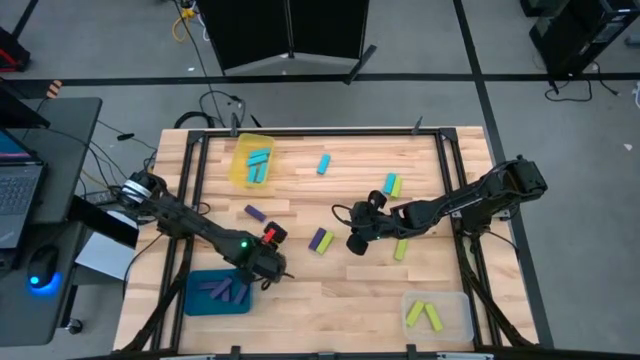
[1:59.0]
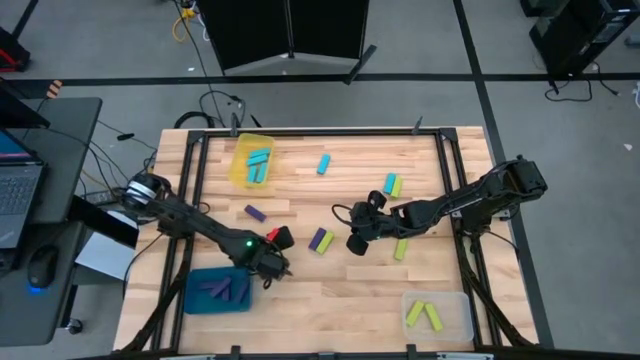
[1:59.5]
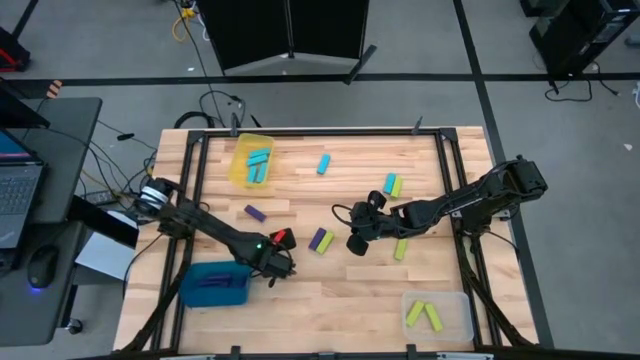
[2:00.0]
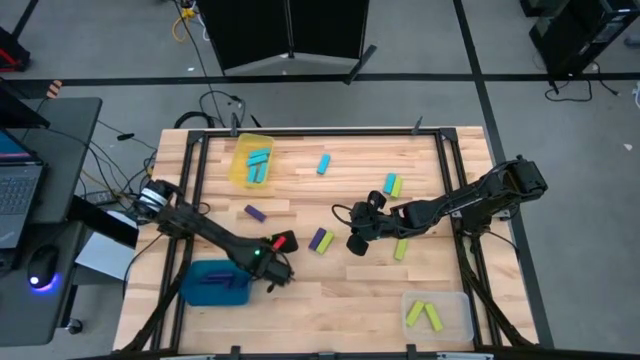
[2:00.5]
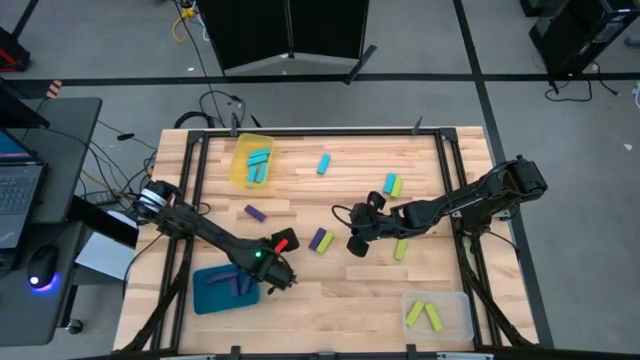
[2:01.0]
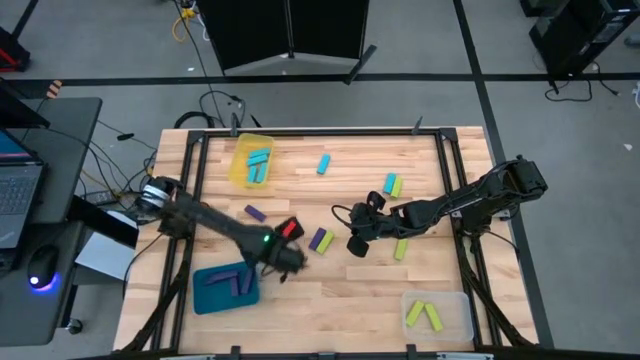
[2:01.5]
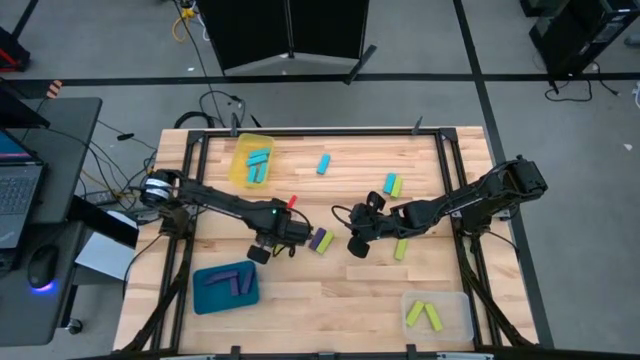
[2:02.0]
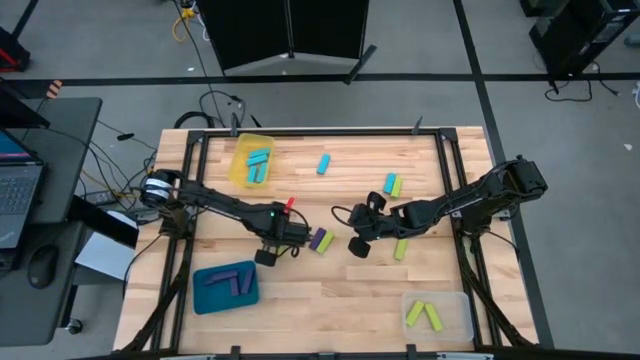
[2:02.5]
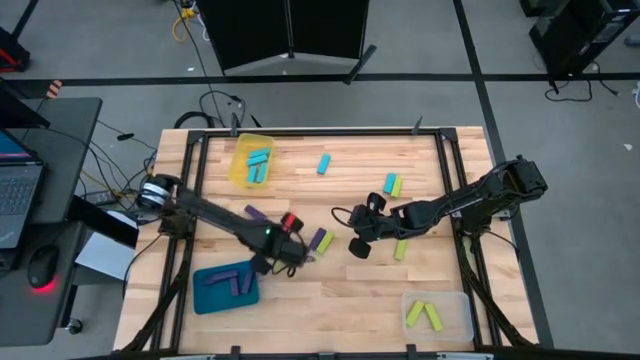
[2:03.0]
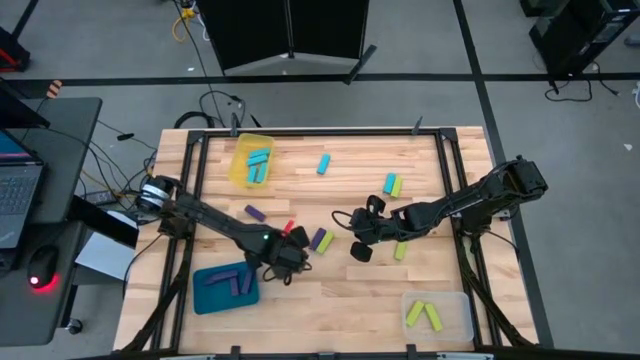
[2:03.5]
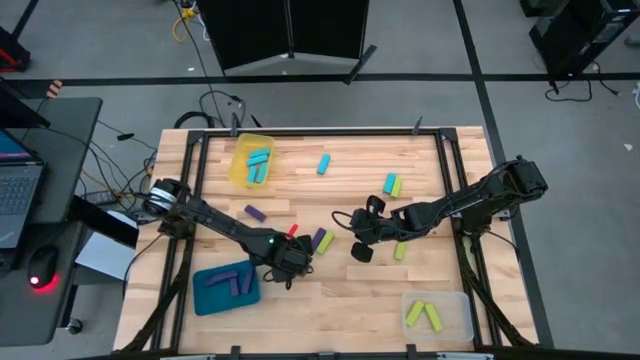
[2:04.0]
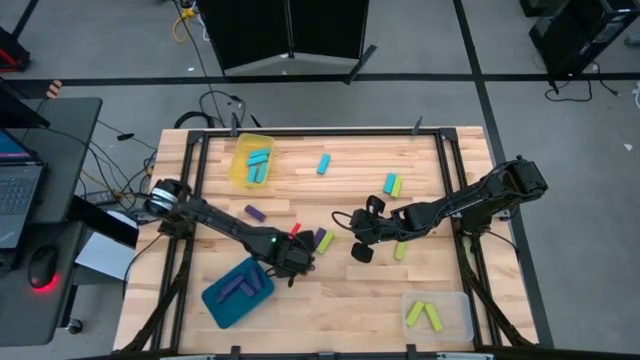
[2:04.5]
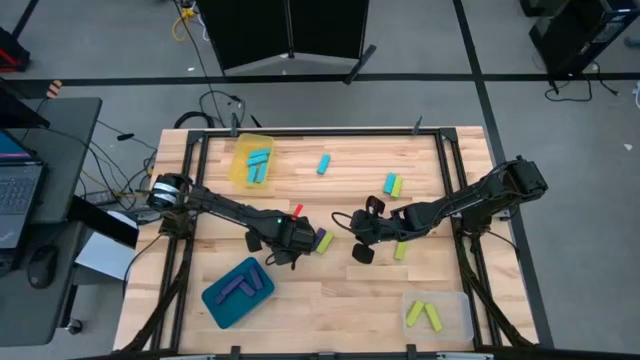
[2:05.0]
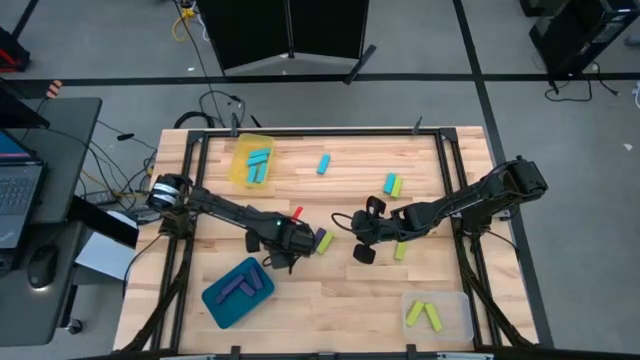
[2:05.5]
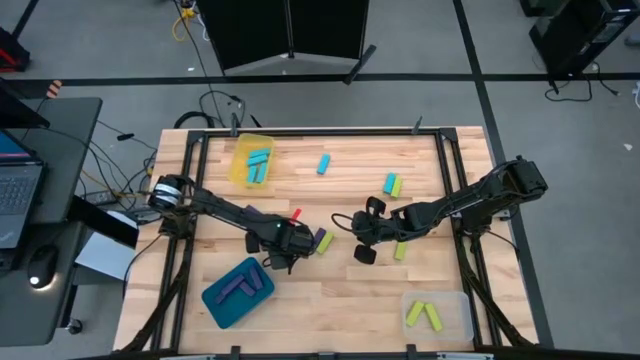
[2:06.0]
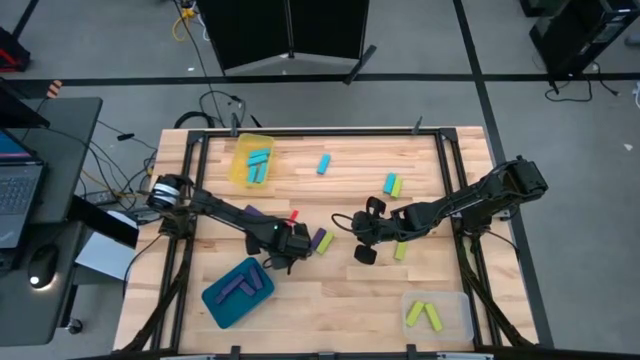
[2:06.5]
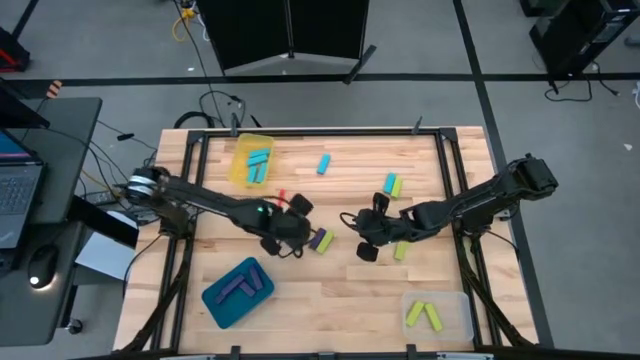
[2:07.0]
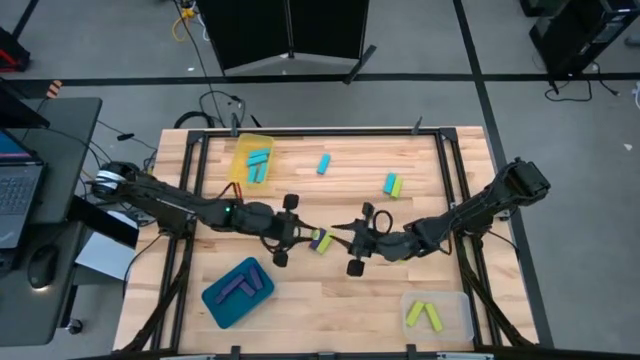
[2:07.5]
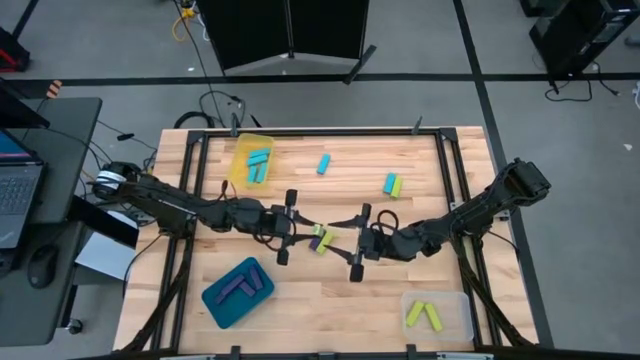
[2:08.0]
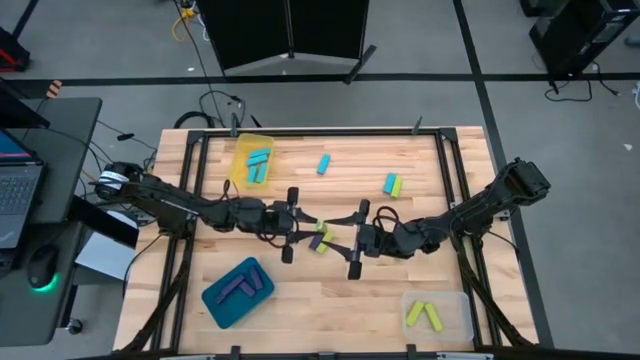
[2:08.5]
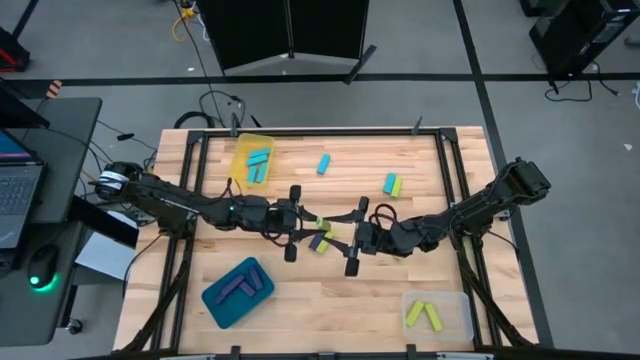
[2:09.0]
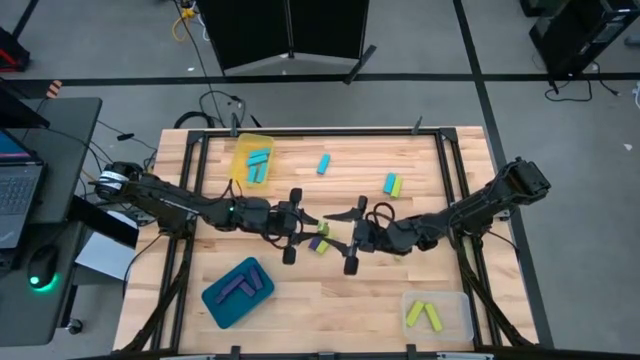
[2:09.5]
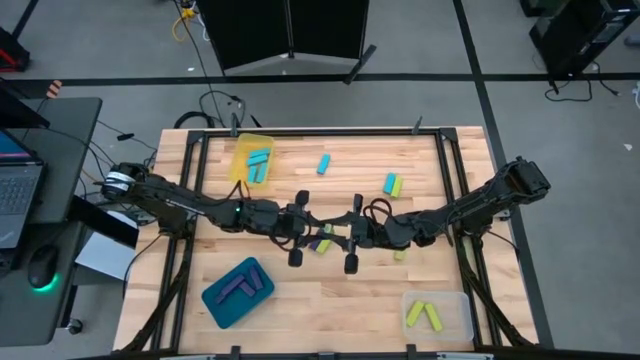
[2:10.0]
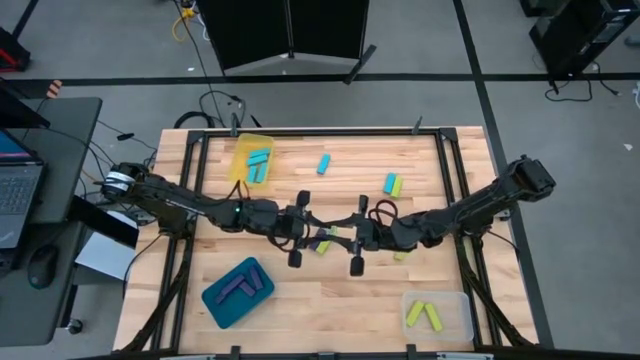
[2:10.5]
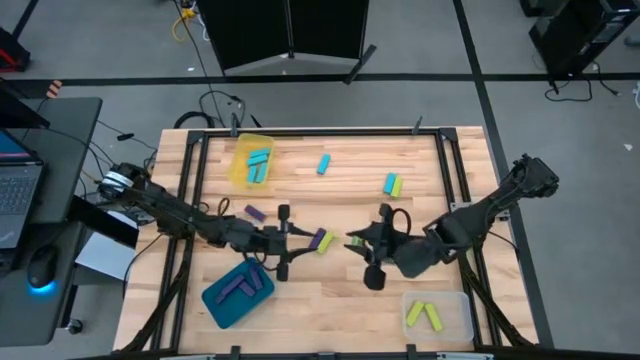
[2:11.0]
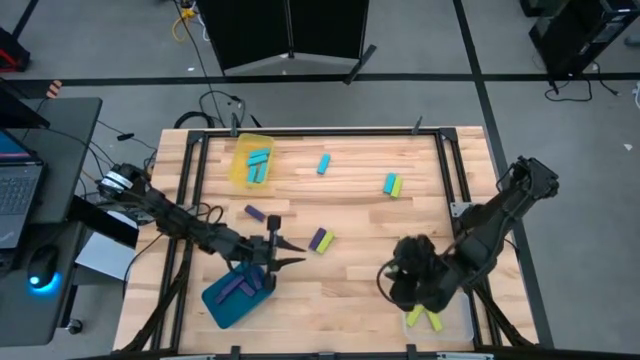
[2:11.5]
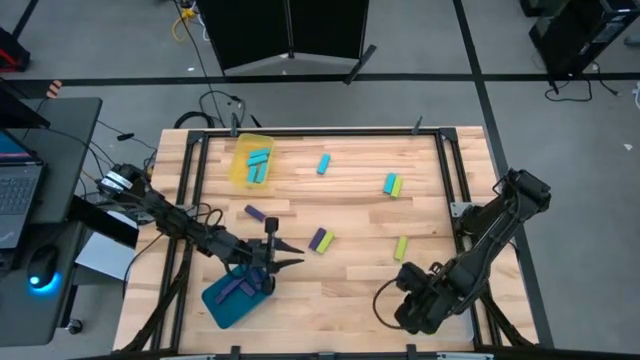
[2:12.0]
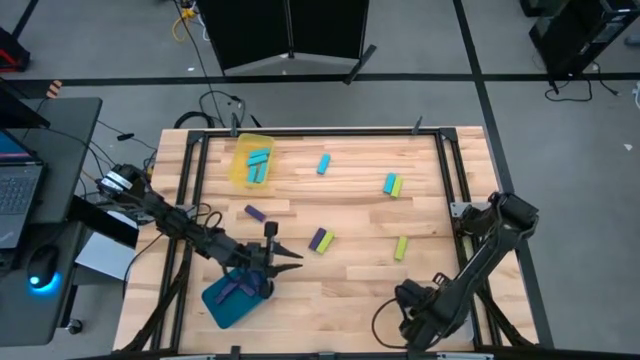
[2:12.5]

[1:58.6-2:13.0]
Task: Sort blocks
Put the green block into the transparent bin

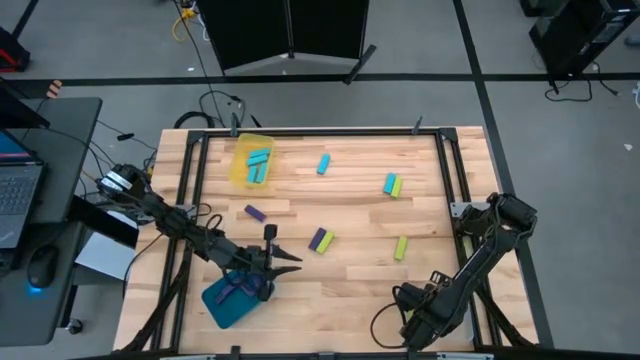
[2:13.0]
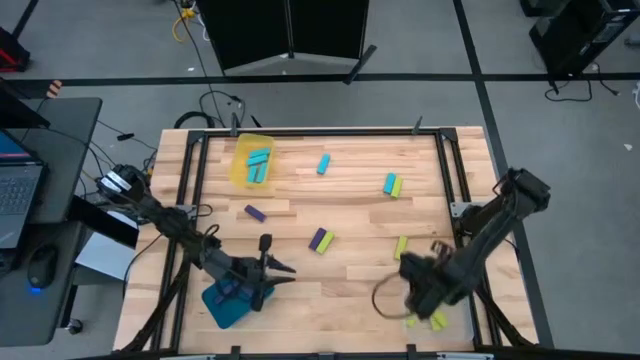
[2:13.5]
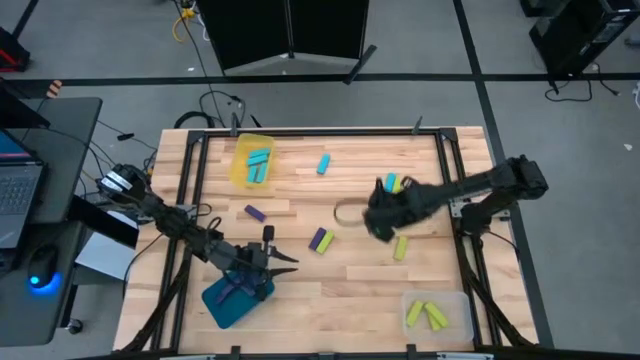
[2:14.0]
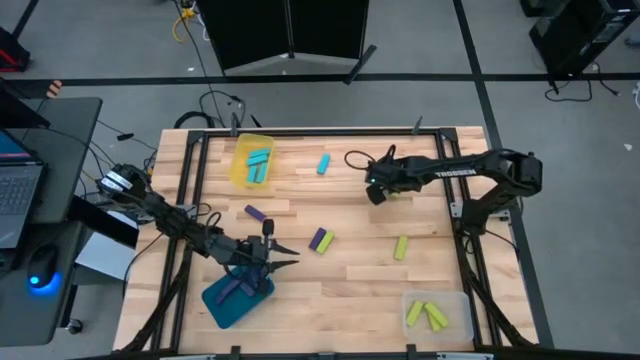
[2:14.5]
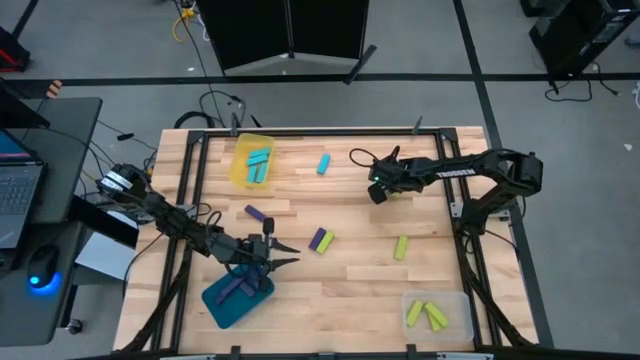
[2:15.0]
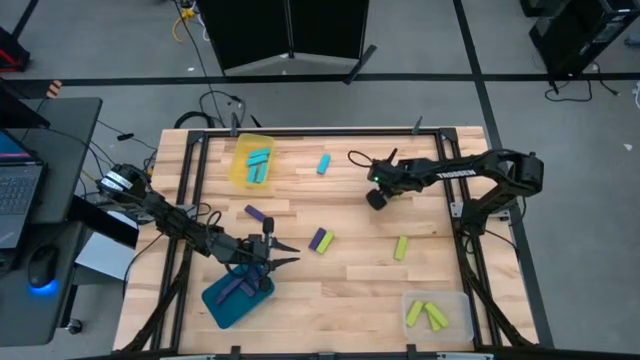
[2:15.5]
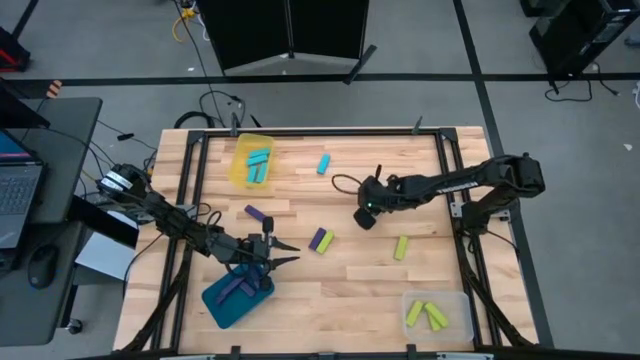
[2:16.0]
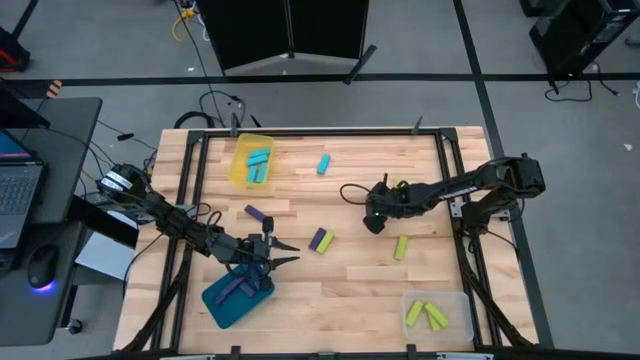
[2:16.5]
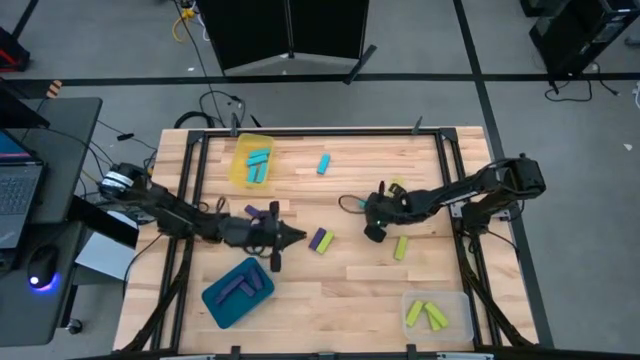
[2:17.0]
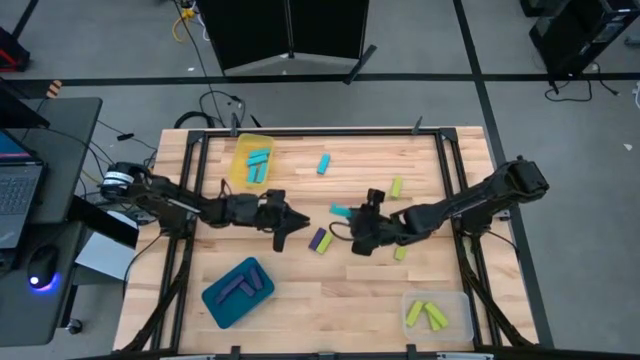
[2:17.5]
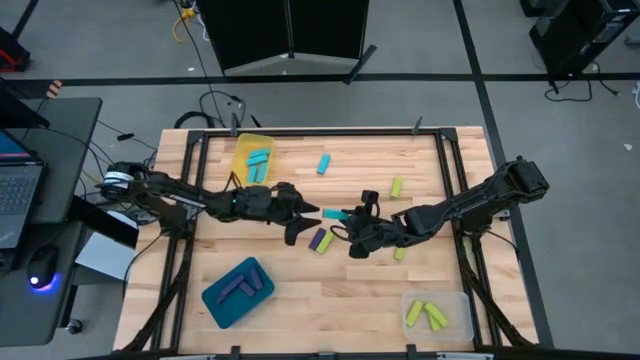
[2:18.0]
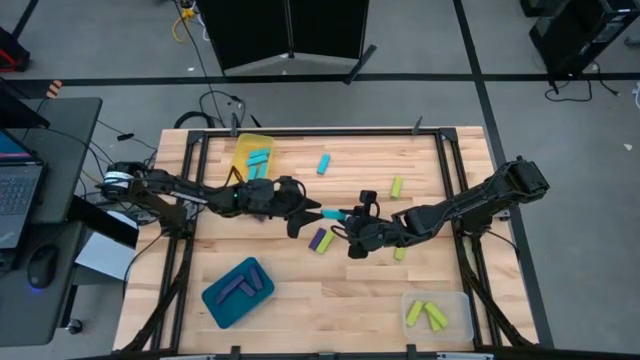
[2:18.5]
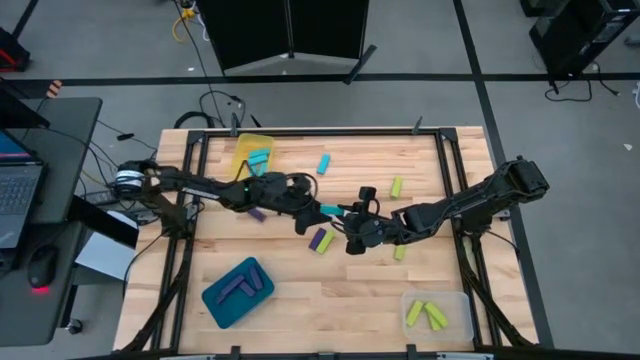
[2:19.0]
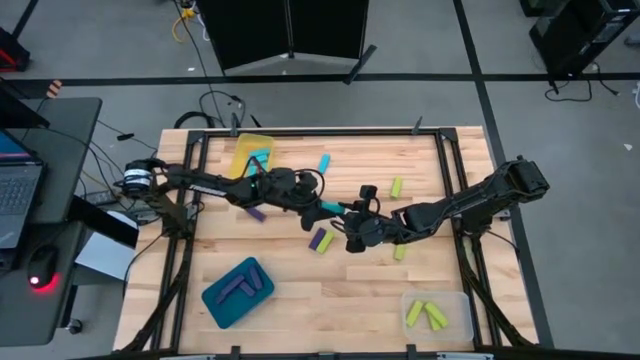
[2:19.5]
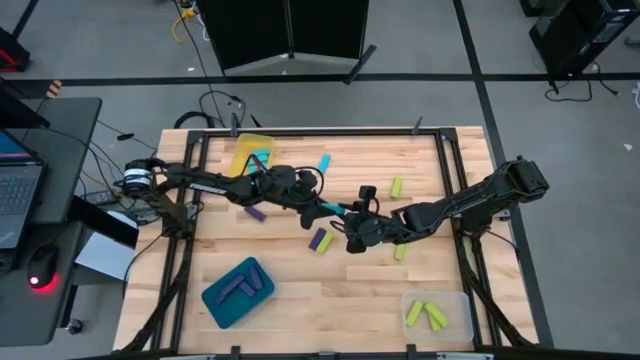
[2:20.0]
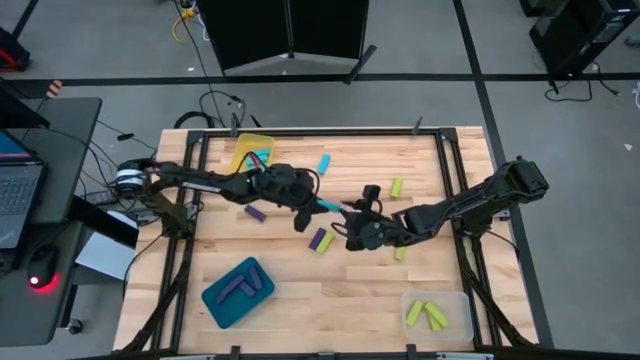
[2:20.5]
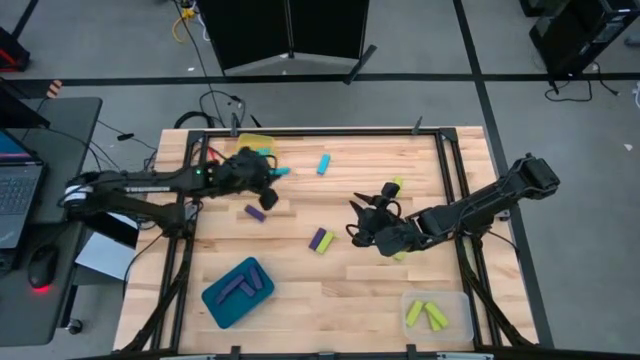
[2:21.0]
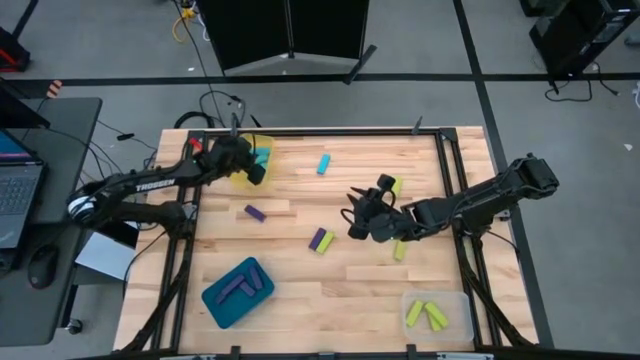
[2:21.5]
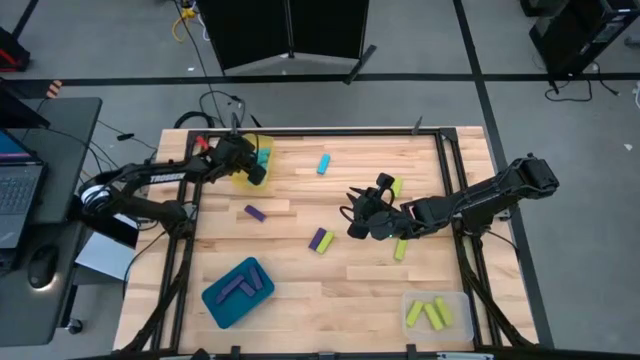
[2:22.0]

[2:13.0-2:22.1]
Put the right blue block into the yellow bin
